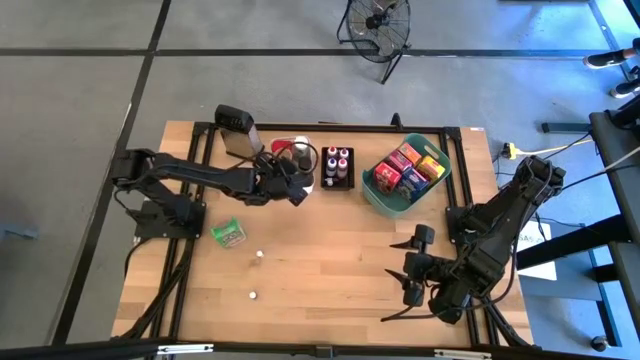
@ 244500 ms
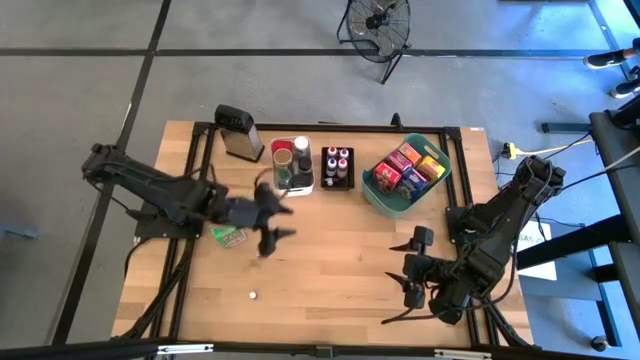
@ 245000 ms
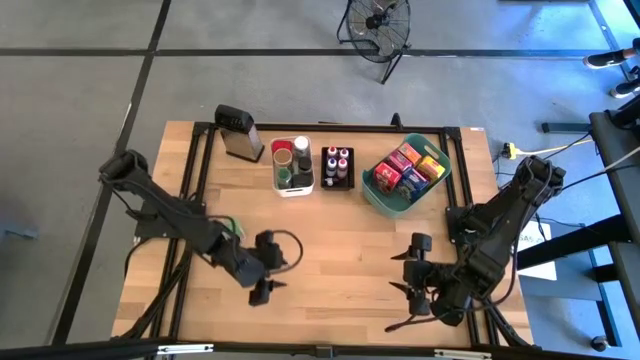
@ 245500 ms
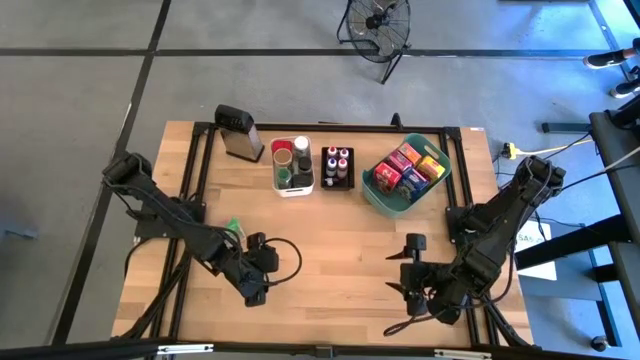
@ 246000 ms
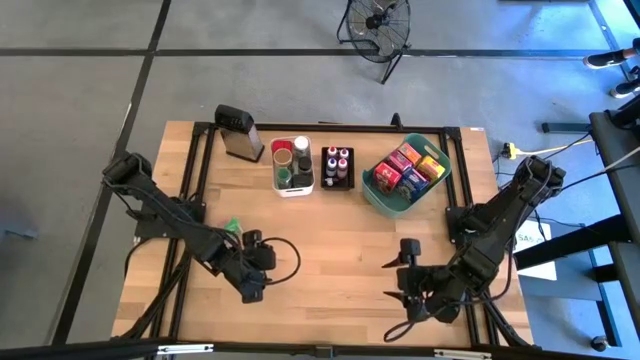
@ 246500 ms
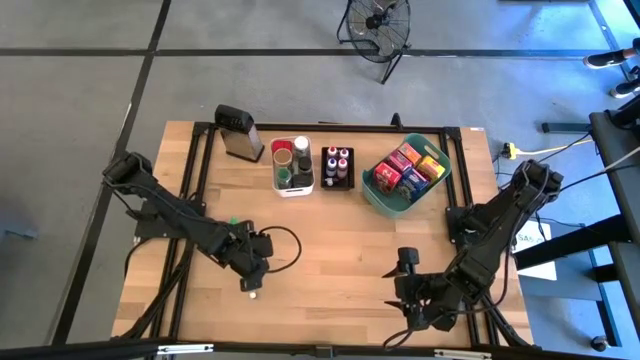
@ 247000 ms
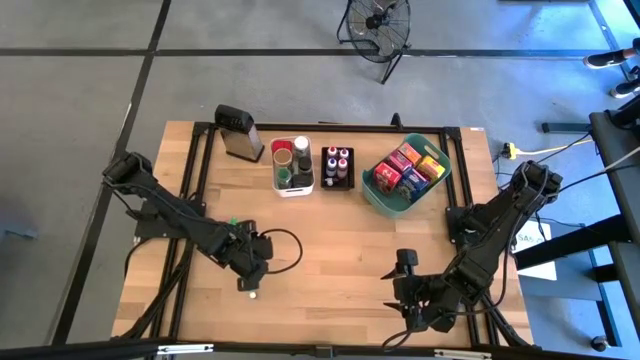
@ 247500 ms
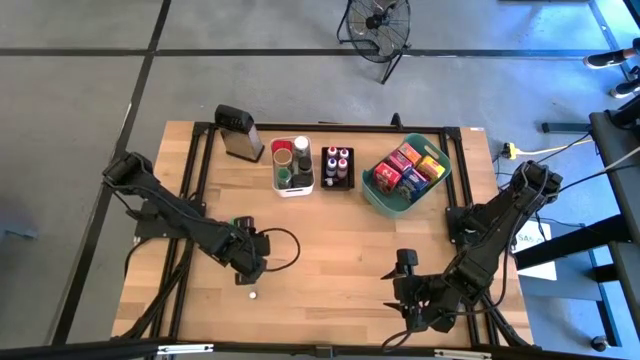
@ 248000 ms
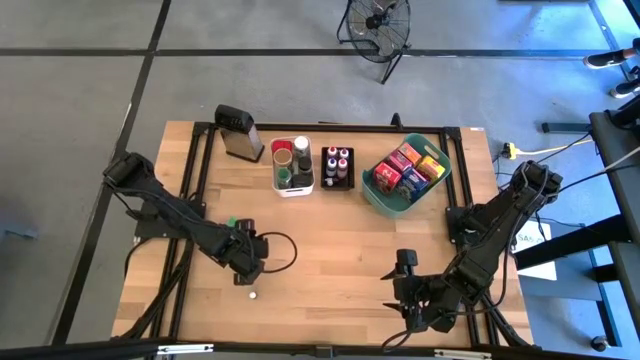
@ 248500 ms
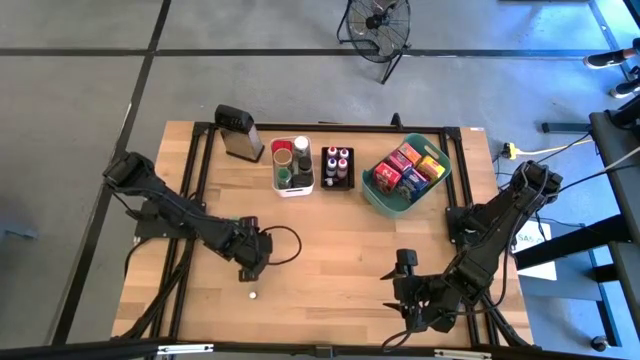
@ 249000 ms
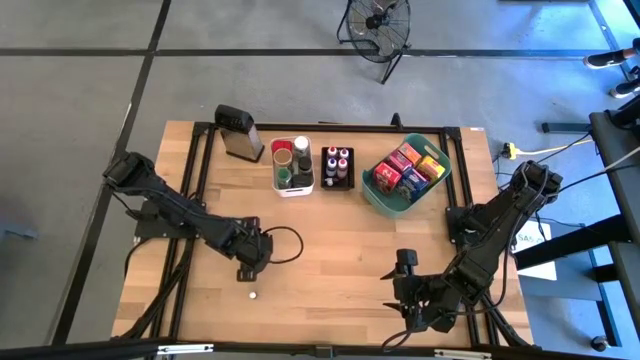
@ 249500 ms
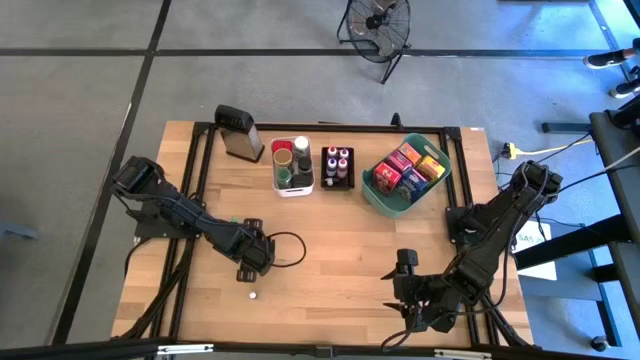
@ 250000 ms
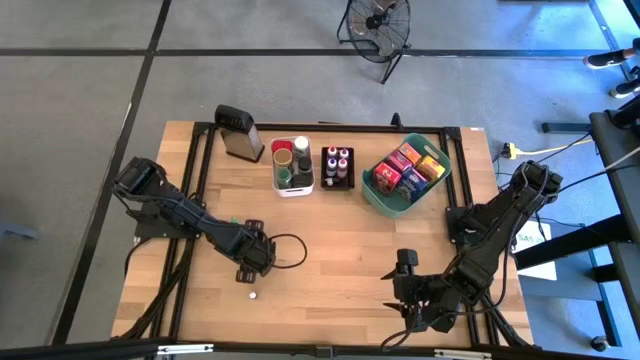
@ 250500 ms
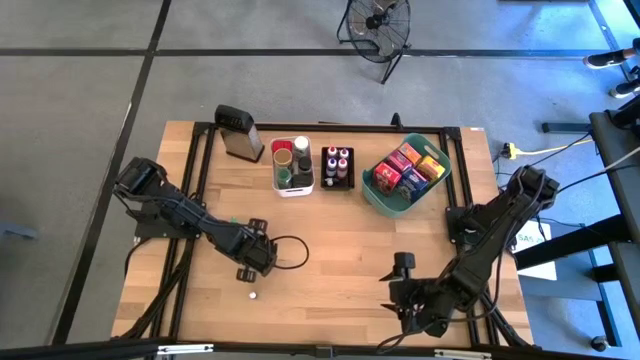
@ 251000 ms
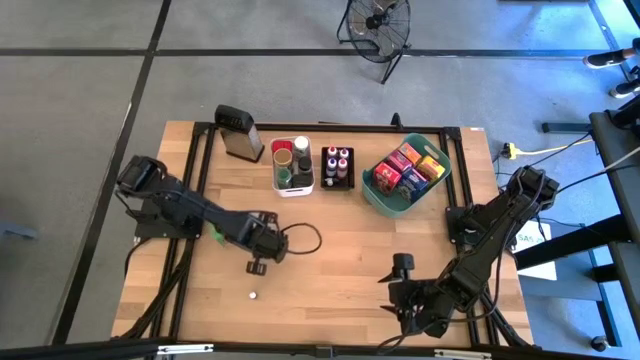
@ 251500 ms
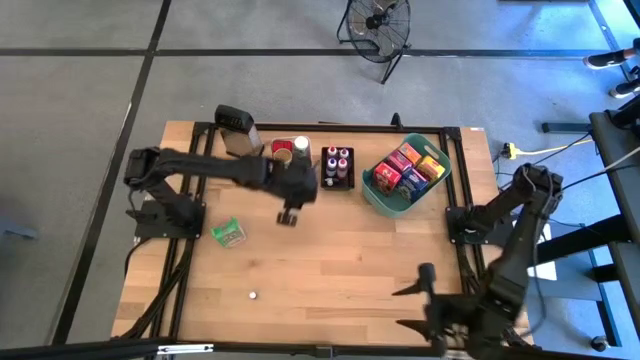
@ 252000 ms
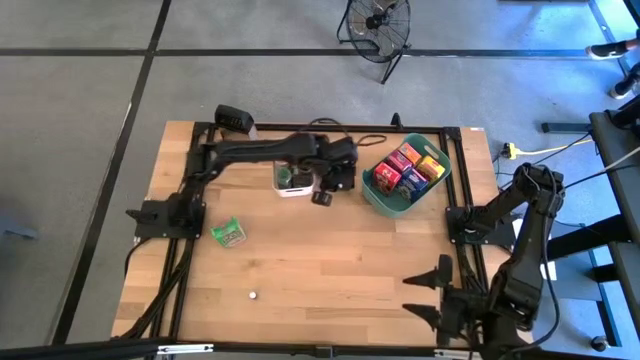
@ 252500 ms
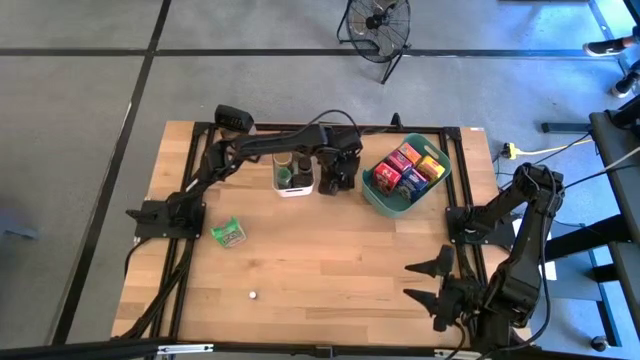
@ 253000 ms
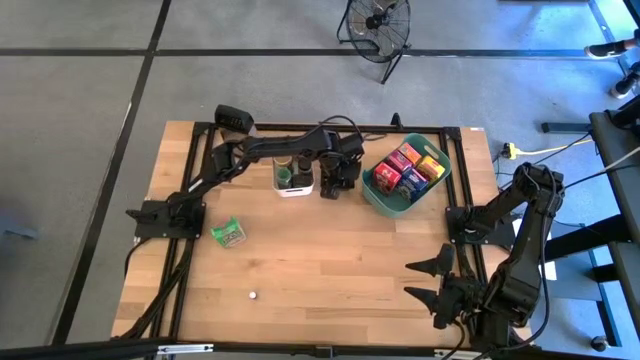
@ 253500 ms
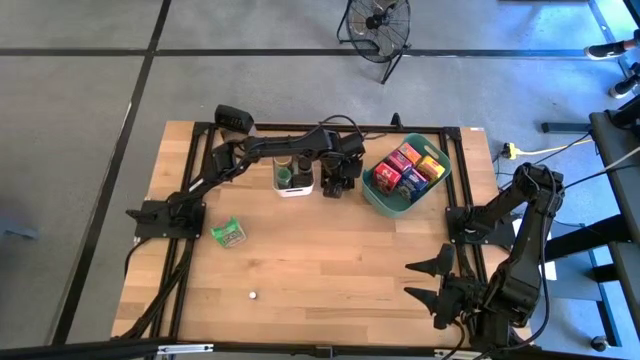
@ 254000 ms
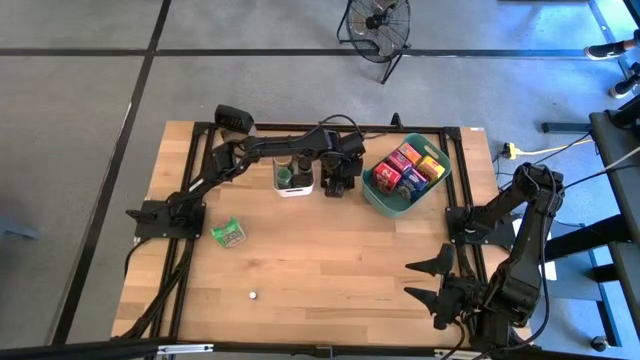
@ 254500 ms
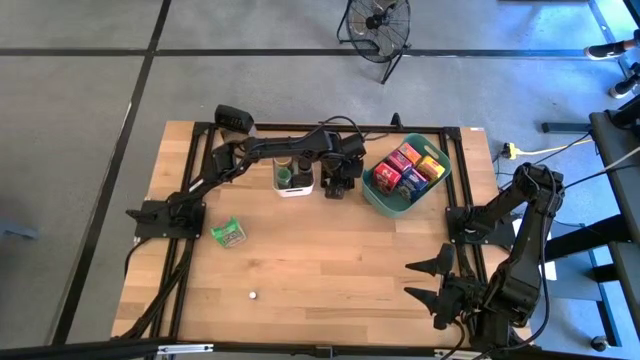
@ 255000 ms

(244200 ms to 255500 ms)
Task: Pick & Place Kitchen Items
Put the small blue food coloring bottle into the black bin

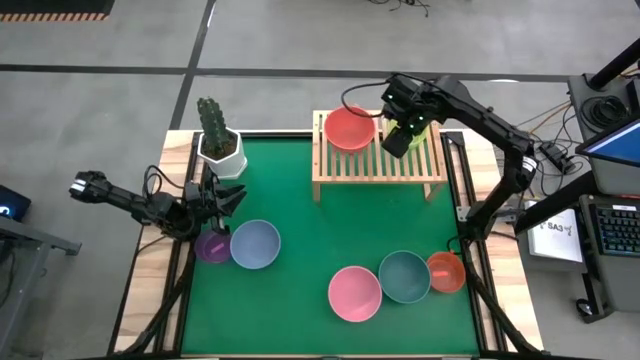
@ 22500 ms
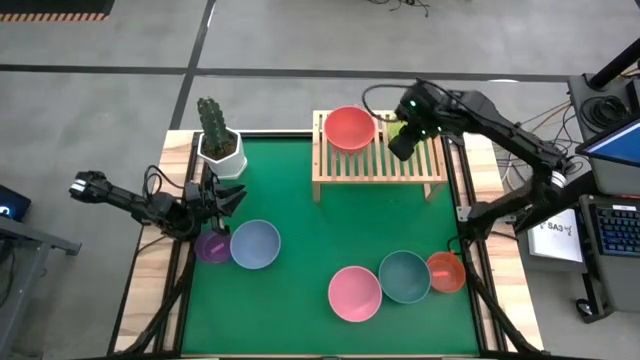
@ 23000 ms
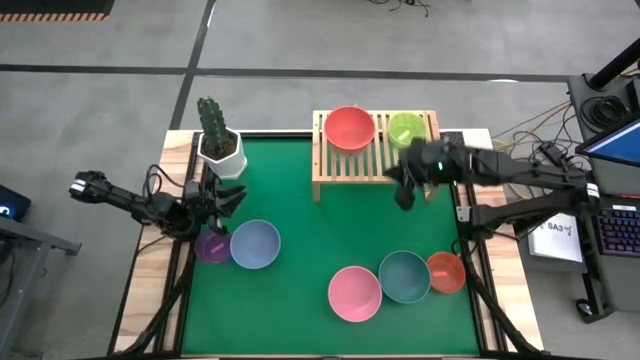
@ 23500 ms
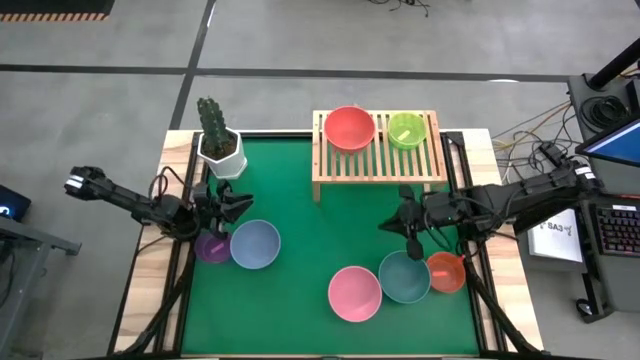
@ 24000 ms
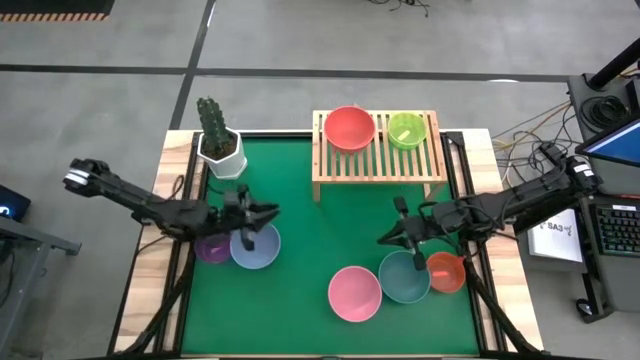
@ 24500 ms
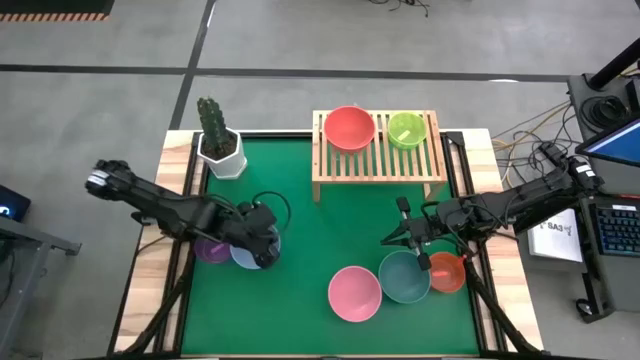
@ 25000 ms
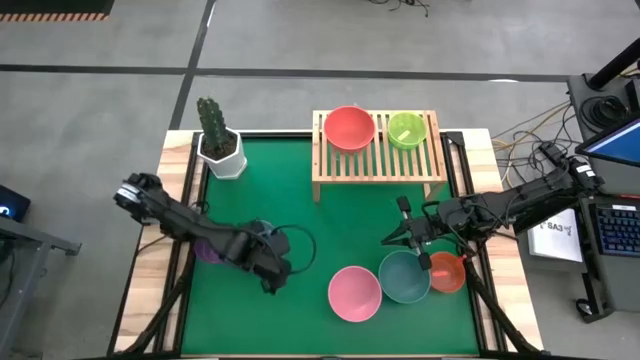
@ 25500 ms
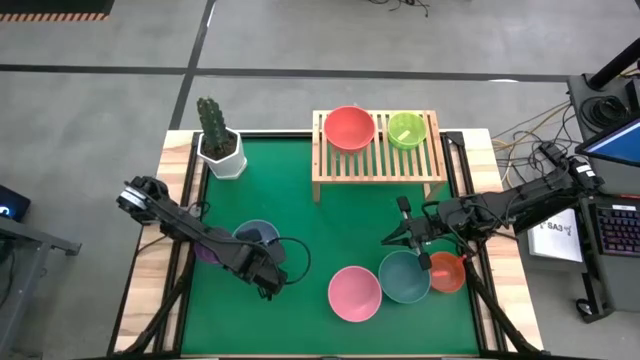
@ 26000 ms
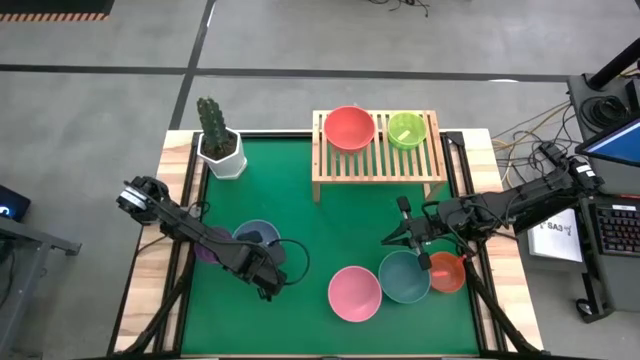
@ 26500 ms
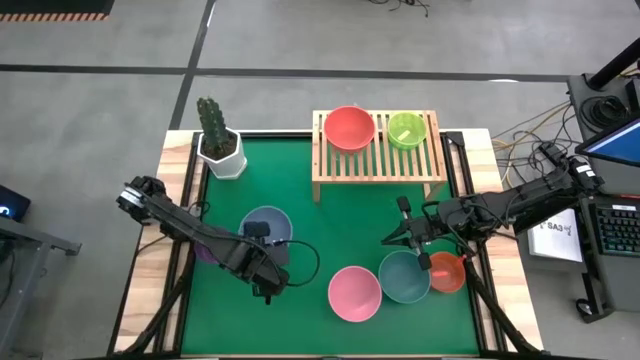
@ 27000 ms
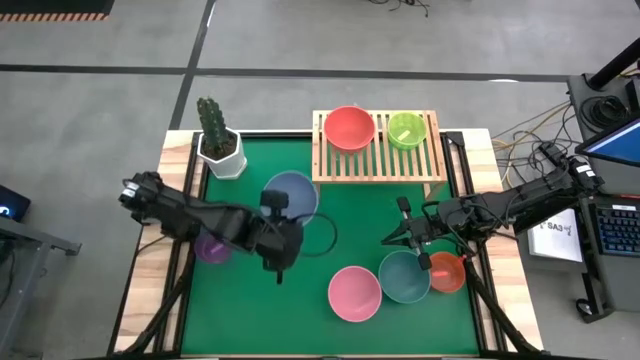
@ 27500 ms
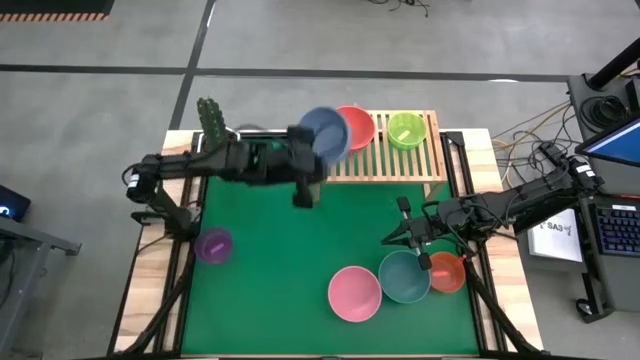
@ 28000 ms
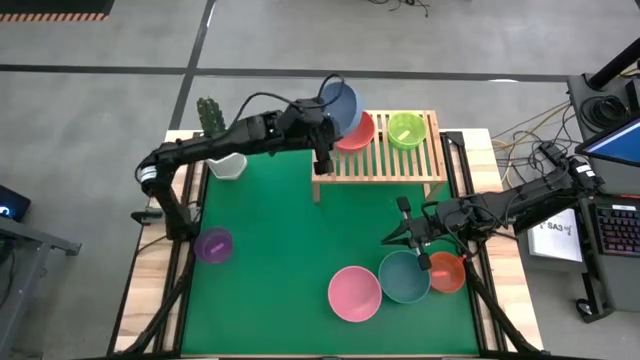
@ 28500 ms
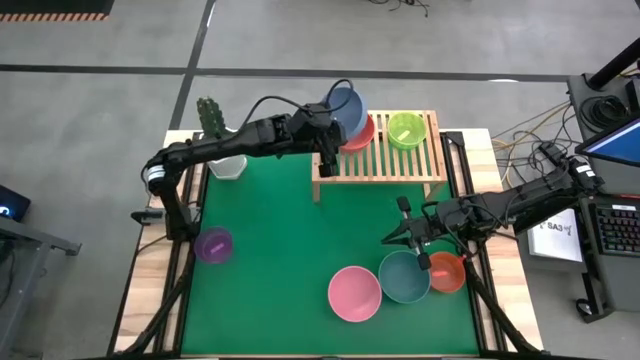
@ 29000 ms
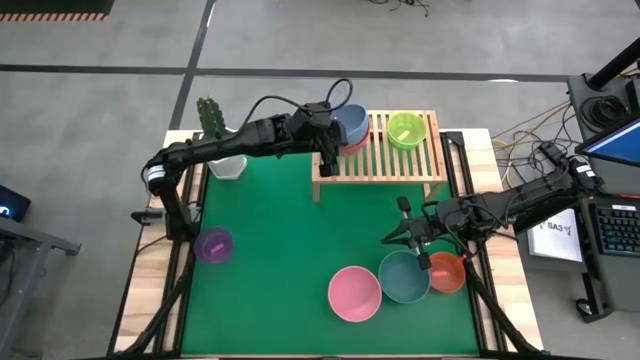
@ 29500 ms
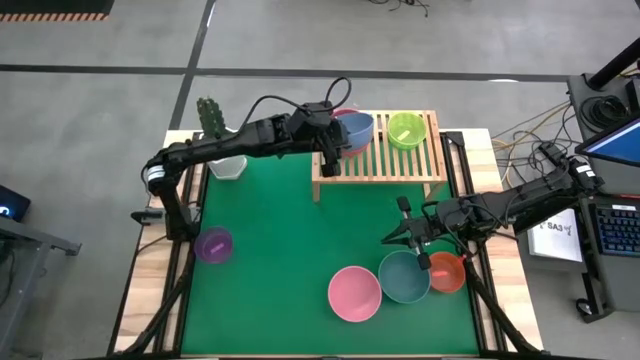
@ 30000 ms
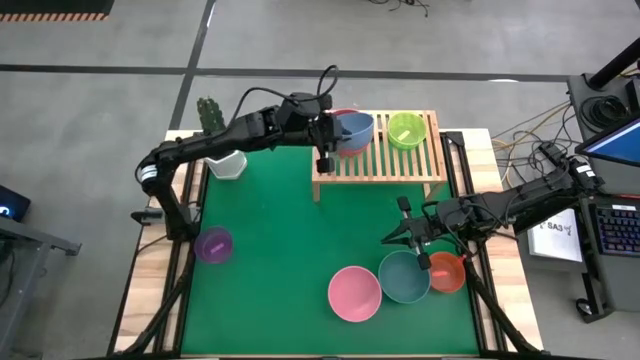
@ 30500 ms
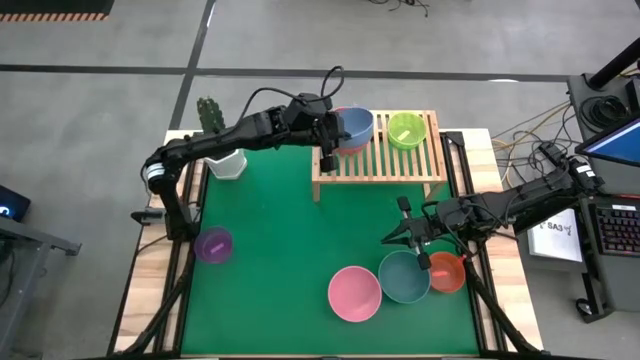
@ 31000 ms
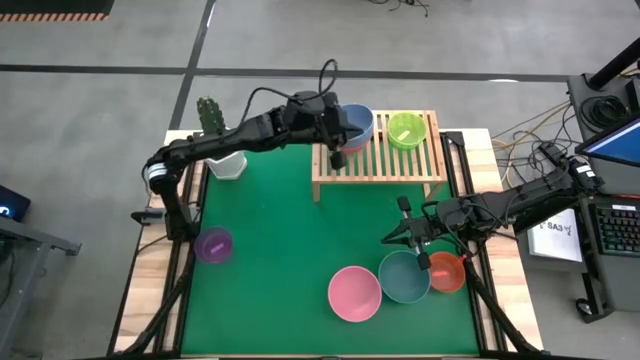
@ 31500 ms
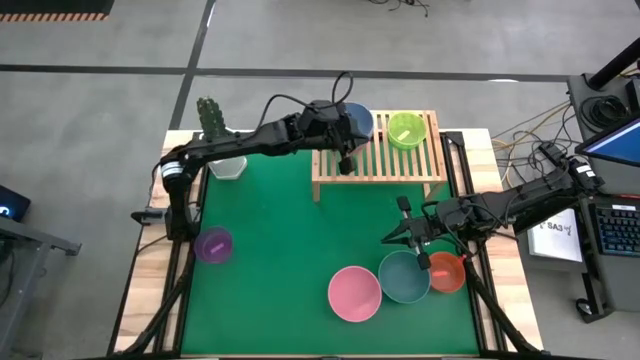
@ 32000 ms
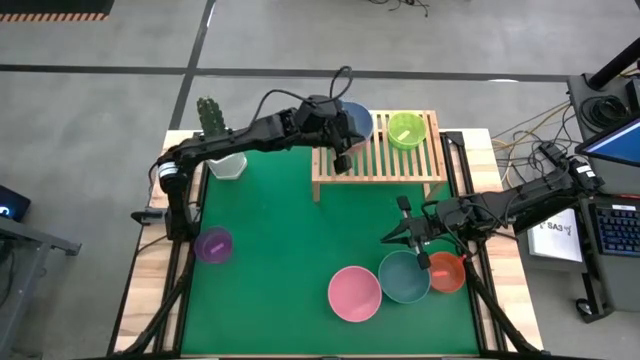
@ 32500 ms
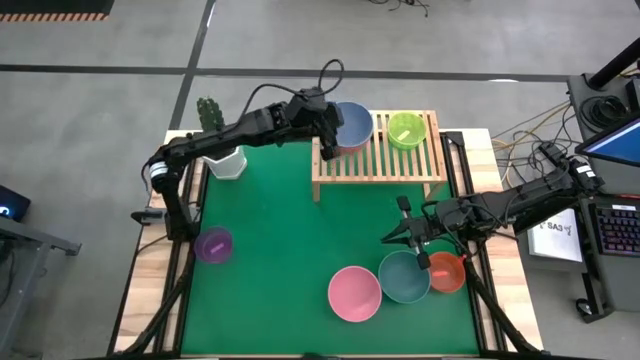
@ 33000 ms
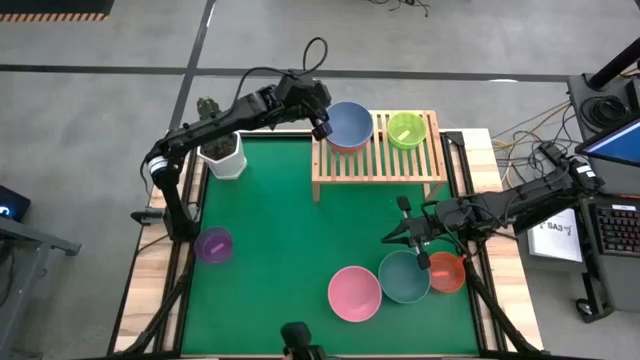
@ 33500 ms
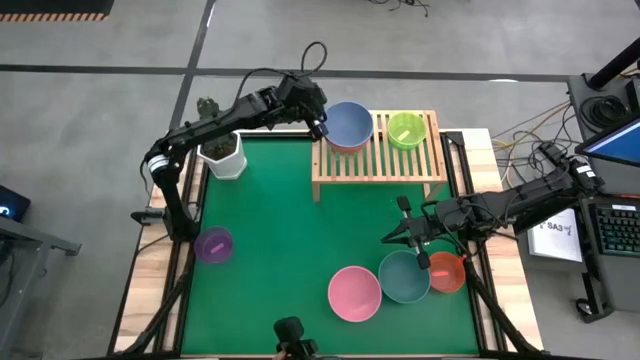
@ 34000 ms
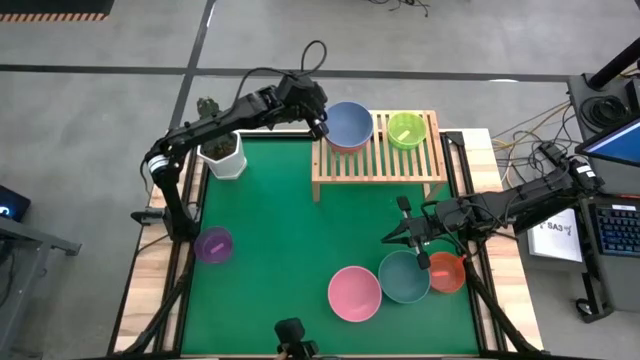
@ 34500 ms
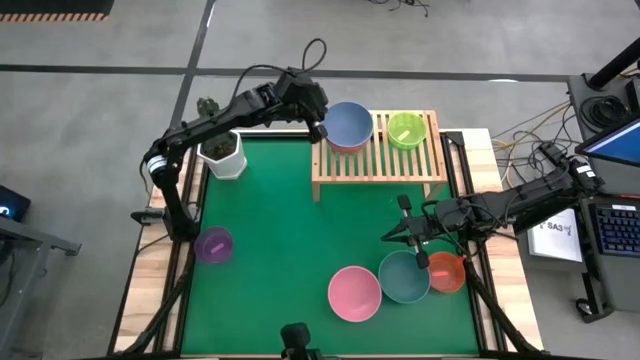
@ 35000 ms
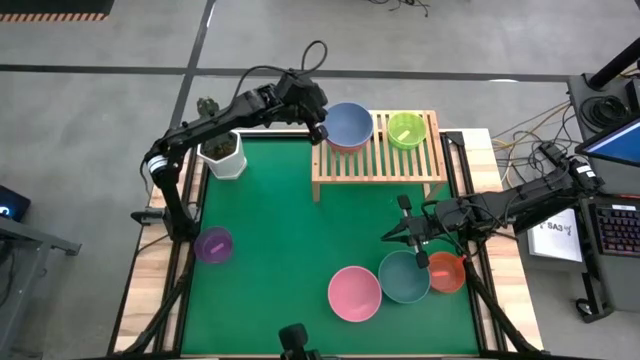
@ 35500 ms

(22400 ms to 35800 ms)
Task: Place and stack bowls onto a shelf
Stack the blue bowl on top of the light orange bowl on the shelf
